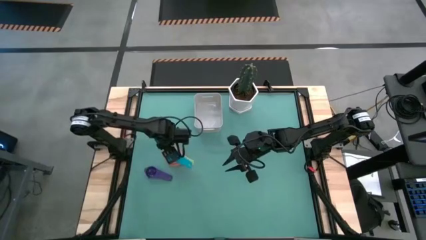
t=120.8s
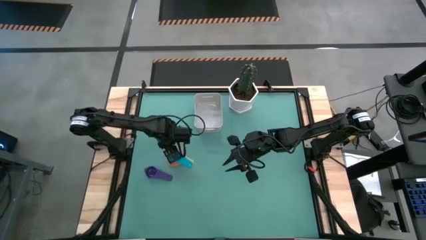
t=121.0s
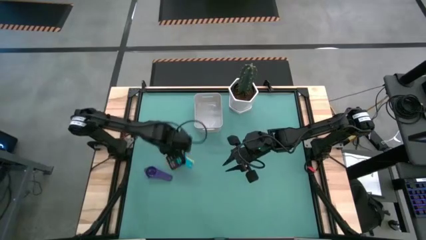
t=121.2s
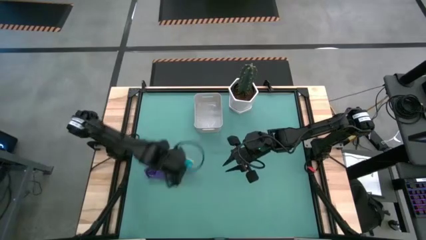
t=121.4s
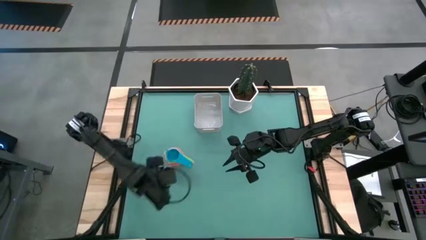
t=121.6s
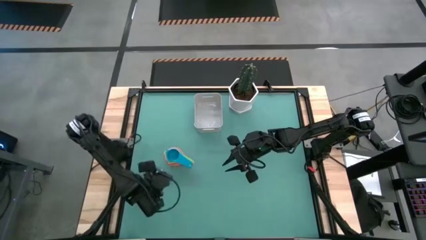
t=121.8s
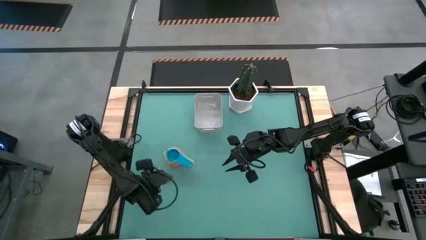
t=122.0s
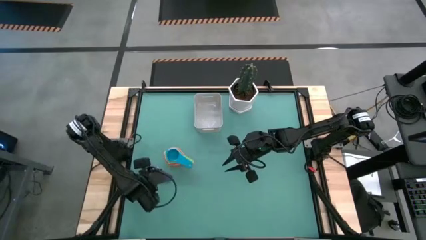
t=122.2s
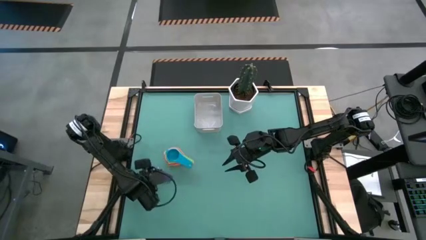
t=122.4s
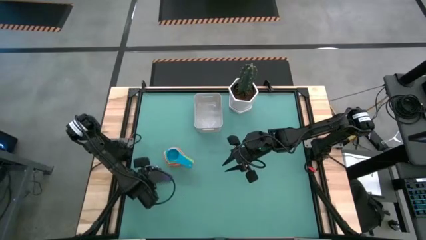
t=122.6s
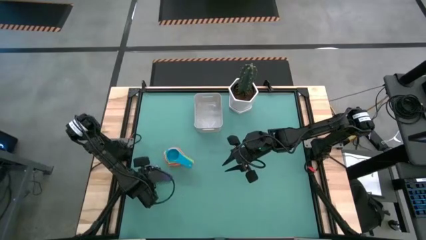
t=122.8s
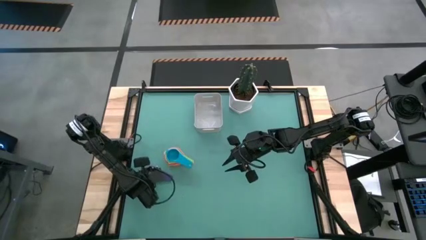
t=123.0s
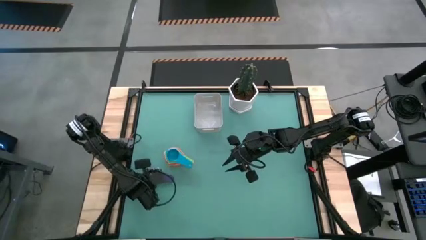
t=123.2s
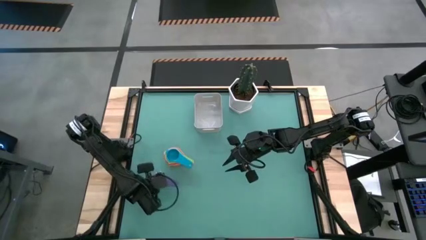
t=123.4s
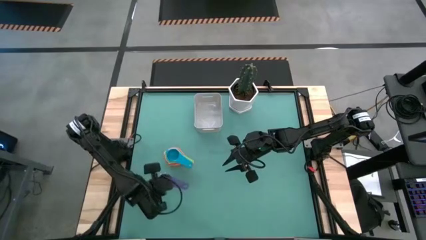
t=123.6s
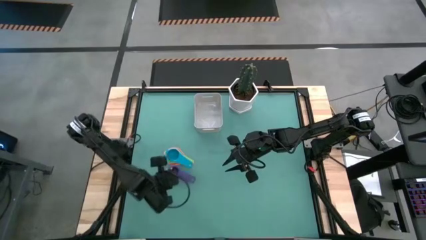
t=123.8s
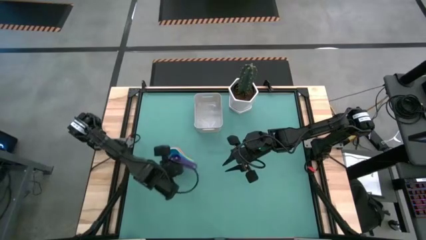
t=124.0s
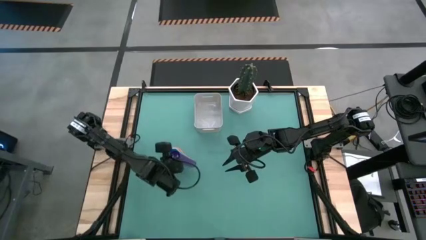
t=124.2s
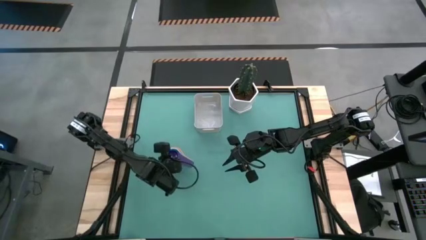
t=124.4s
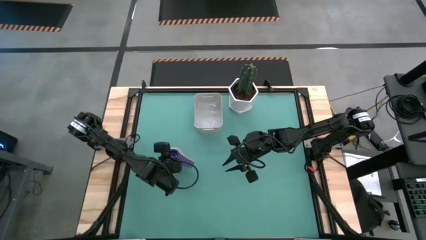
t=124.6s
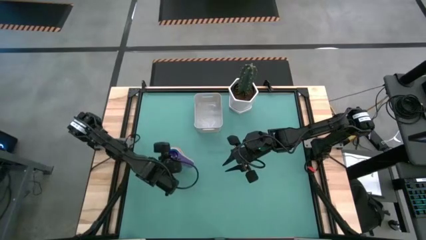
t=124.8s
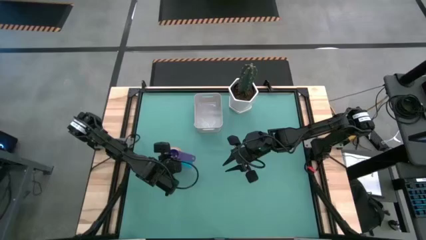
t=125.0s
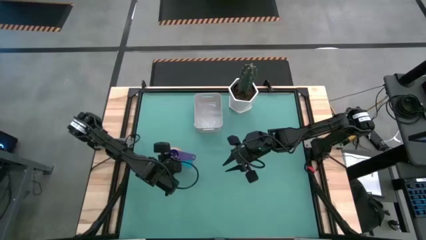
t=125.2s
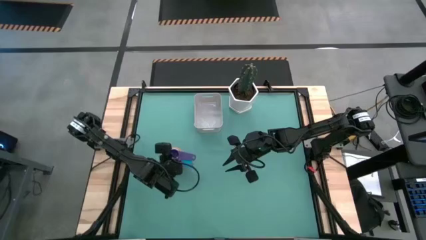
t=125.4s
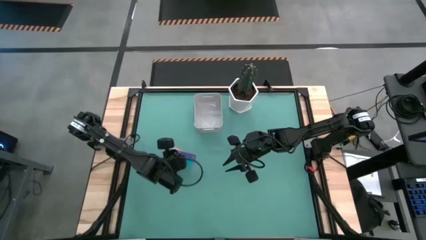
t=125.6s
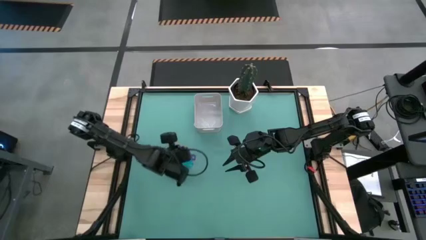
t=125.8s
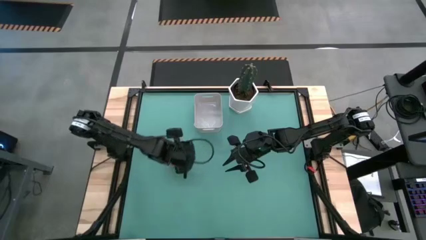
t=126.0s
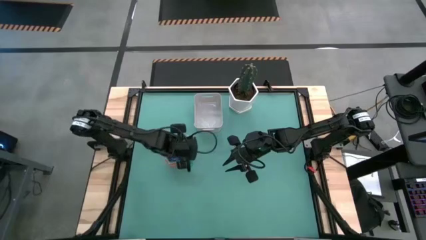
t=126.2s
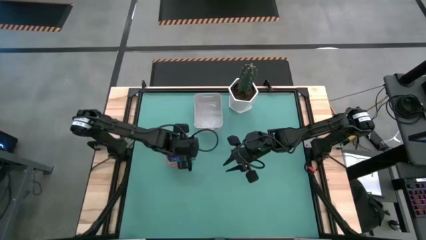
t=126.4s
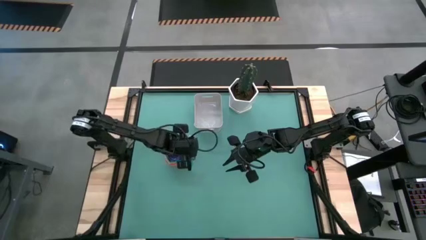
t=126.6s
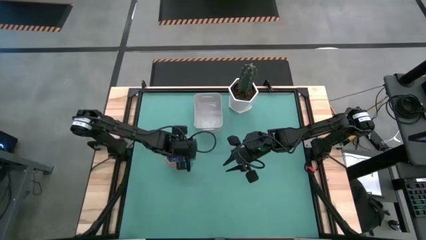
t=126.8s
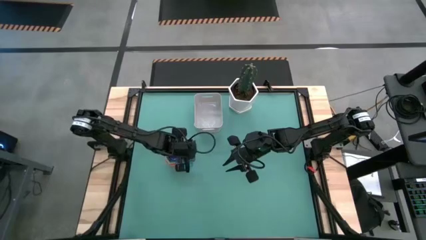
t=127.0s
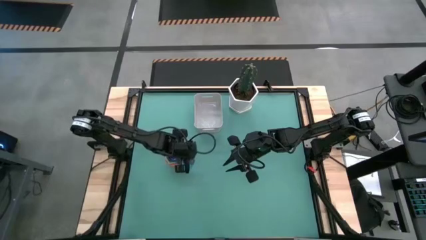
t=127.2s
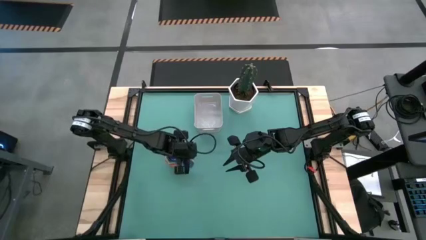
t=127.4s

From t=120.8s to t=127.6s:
Task: Nest measuring cups in basket
Stack the violet measuring cup on top of the blue measuring cup

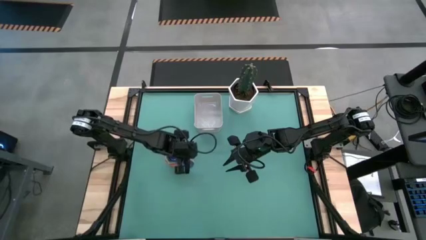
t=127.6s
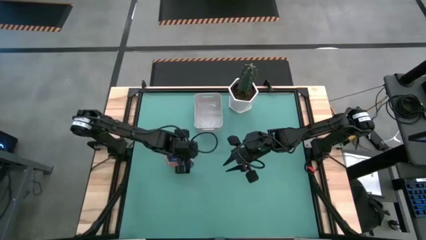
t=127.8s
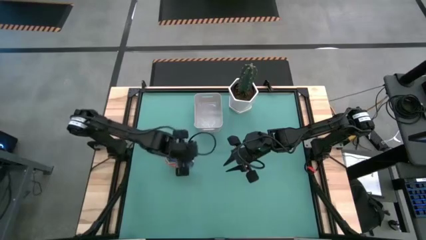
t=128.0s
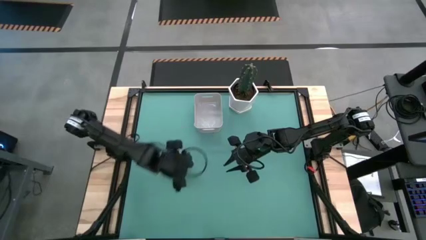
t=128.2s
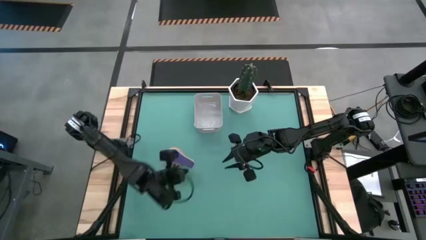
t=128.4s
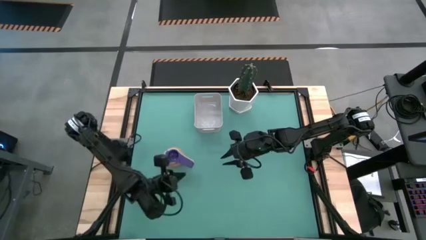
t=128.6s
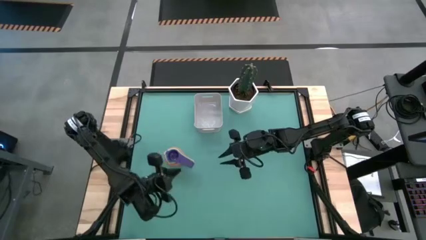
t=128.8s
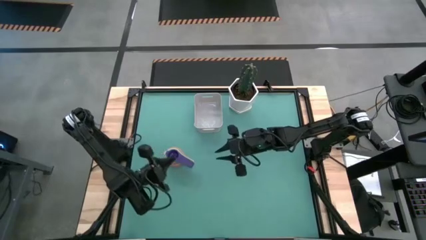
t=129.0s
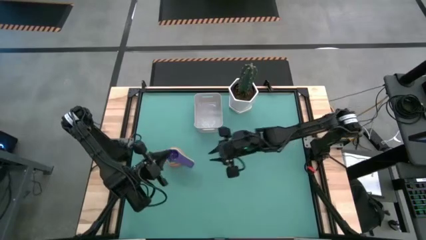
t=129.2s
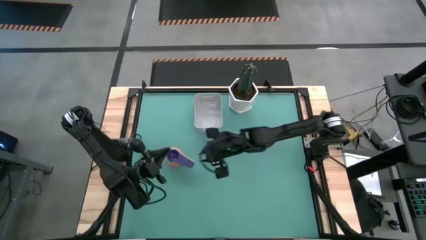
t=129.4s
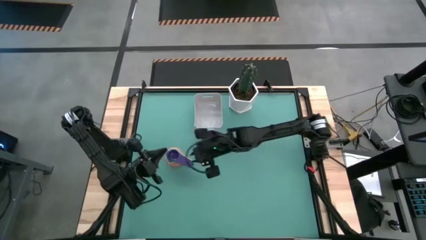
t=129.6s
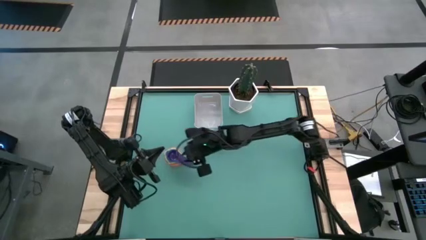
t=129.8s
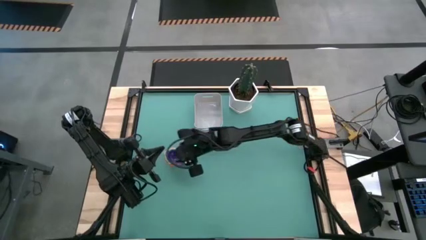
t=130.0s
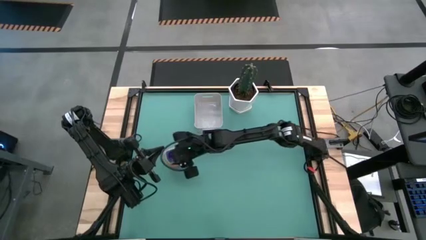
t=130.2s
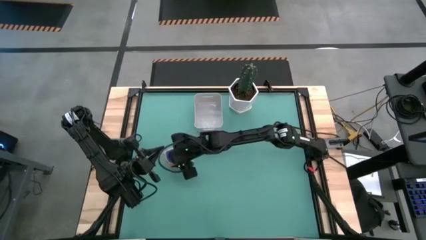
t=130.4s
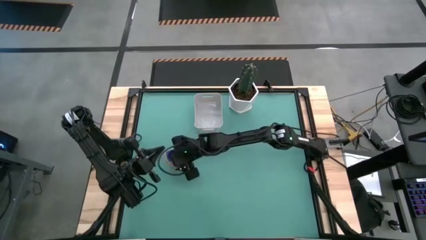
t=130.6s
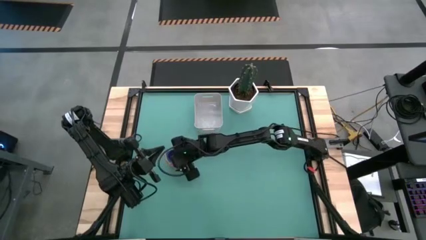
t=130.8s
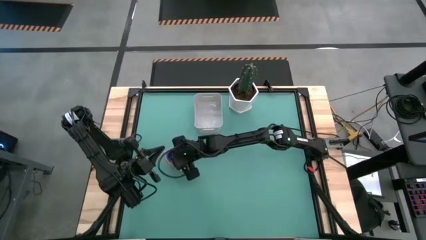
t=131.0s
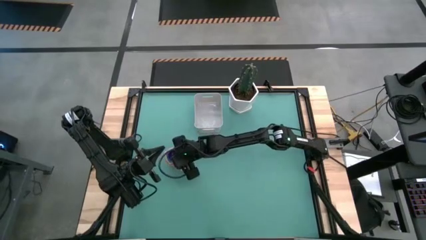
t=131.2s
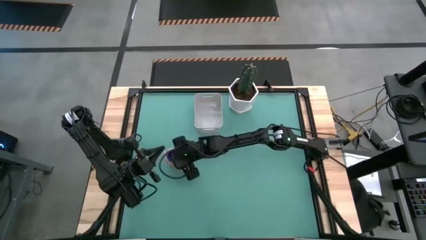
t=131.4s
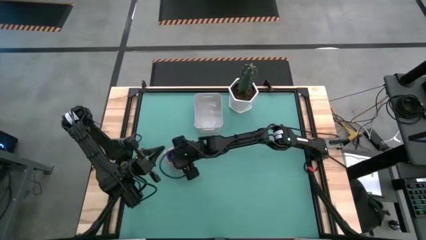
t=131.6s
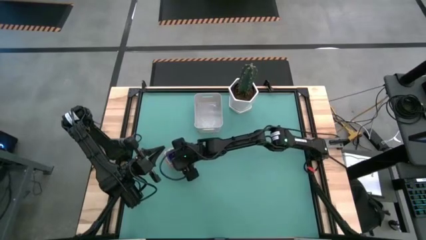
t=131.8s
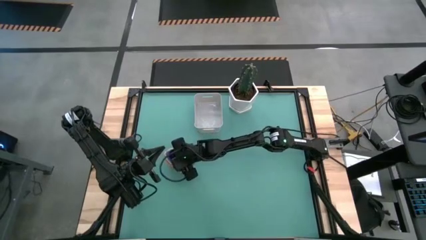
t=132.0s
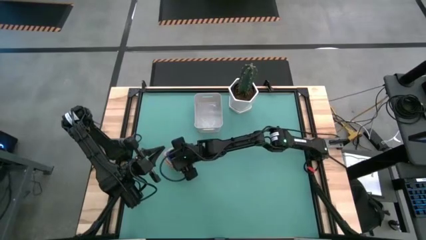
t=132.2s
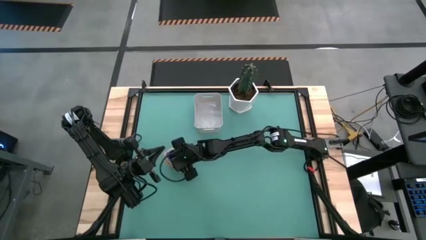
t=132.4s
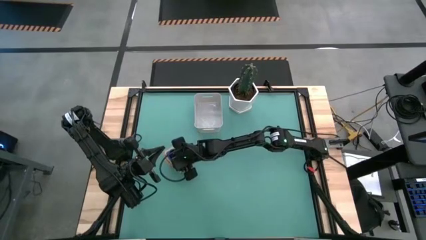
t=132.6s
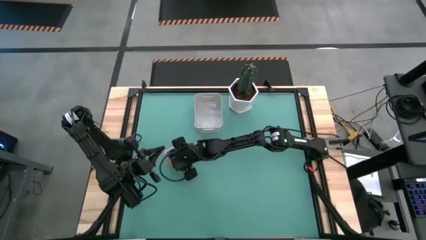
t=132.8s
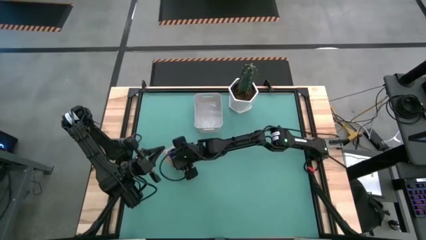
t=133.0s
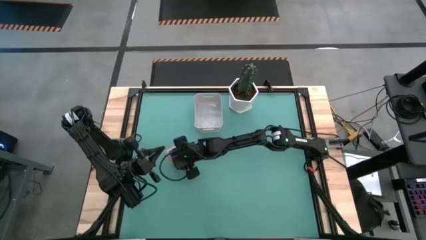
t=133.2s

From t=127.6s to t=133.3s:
Put the nested measuring cups into the gray bin

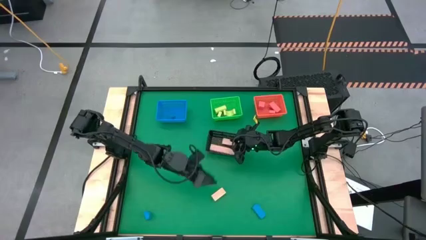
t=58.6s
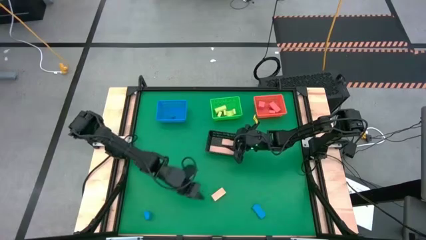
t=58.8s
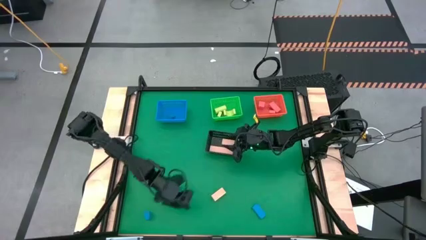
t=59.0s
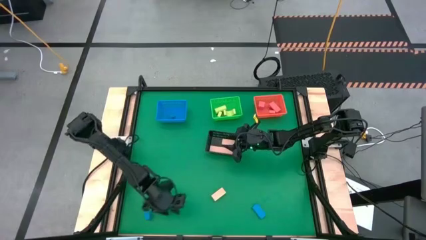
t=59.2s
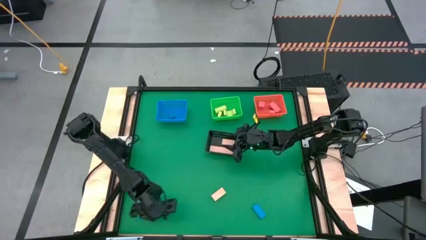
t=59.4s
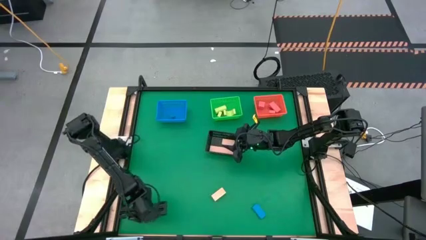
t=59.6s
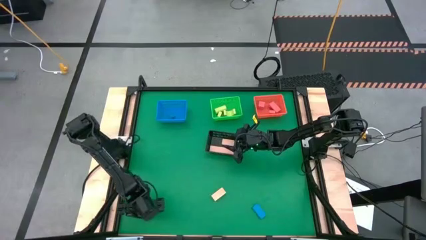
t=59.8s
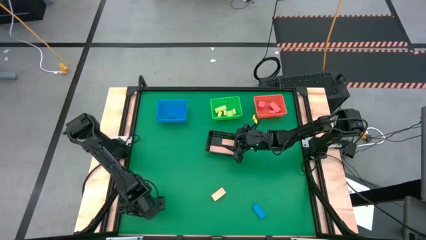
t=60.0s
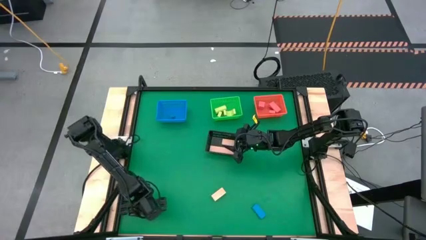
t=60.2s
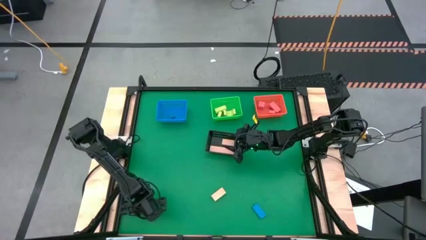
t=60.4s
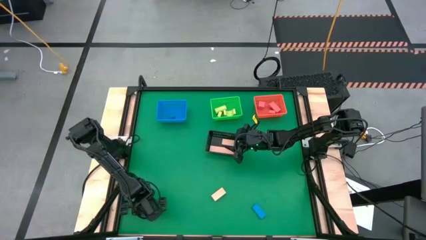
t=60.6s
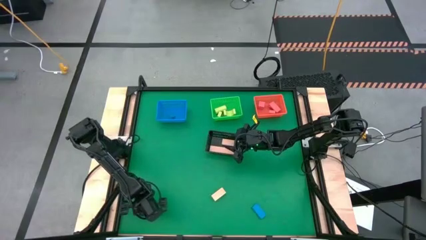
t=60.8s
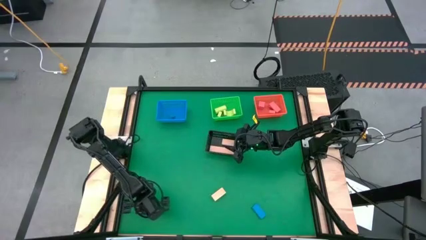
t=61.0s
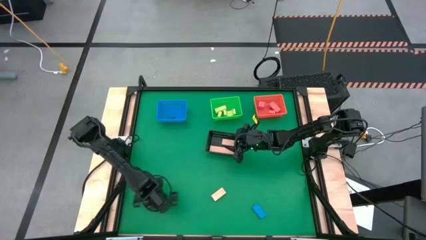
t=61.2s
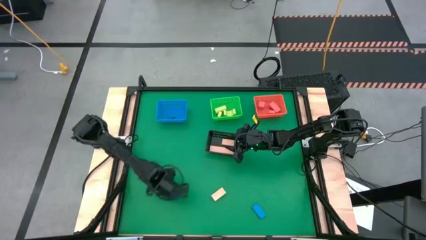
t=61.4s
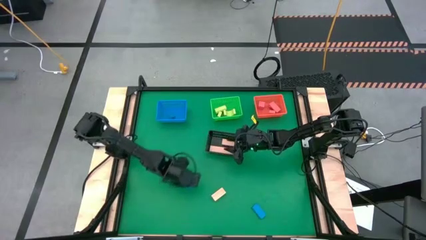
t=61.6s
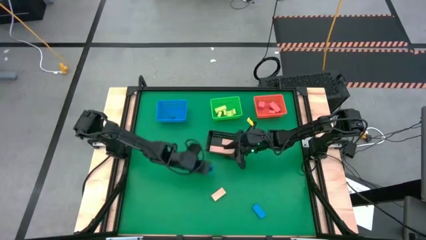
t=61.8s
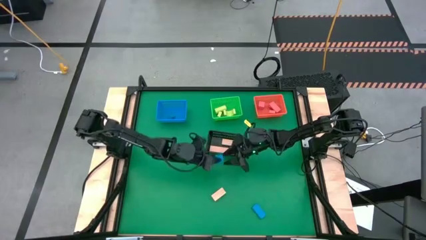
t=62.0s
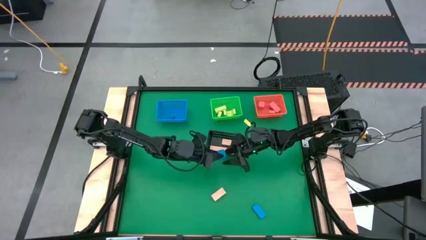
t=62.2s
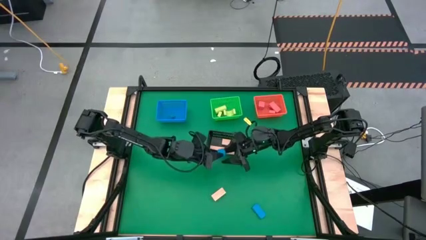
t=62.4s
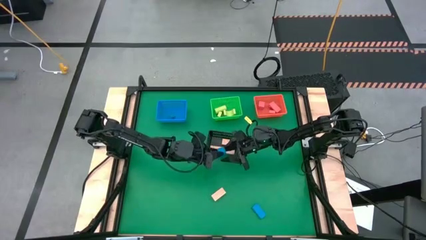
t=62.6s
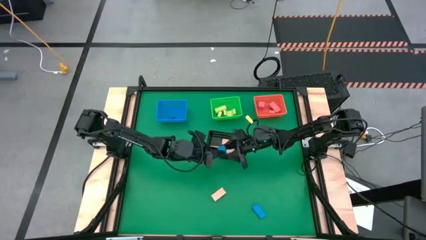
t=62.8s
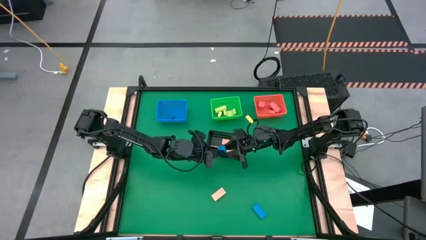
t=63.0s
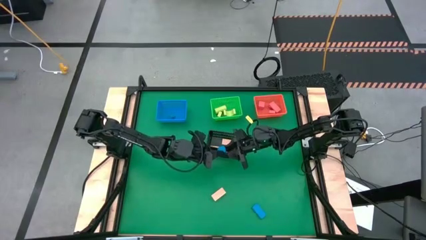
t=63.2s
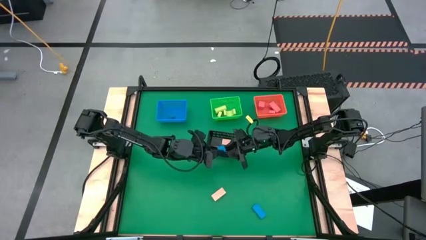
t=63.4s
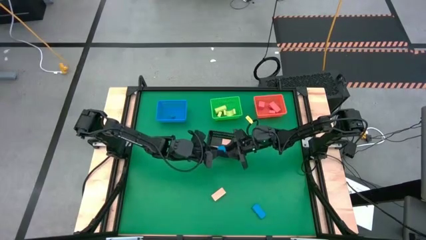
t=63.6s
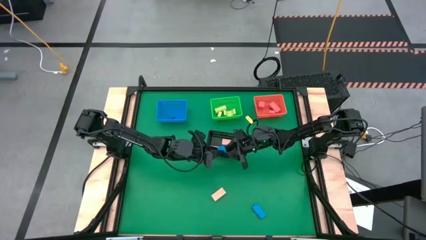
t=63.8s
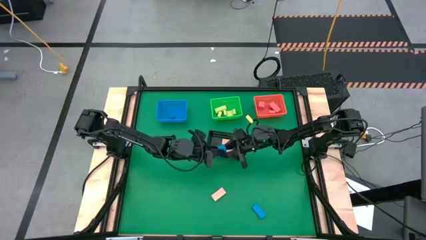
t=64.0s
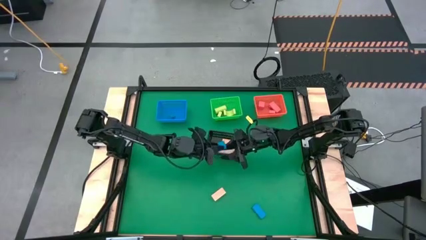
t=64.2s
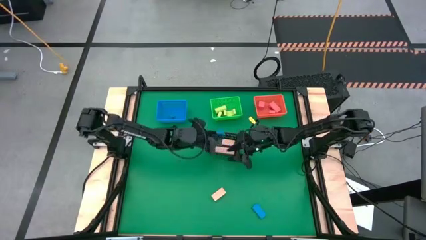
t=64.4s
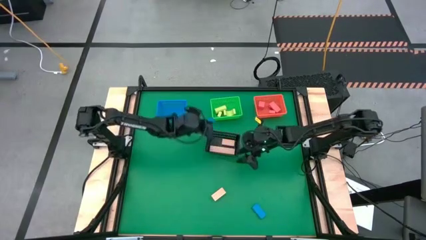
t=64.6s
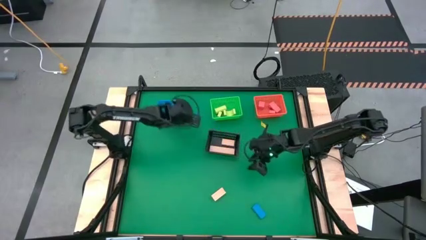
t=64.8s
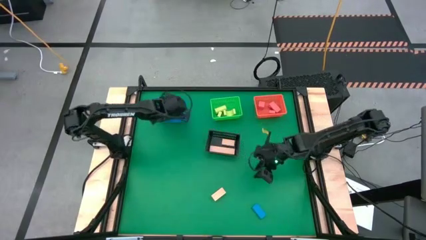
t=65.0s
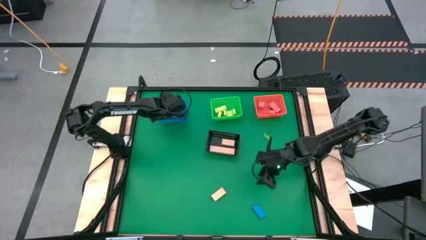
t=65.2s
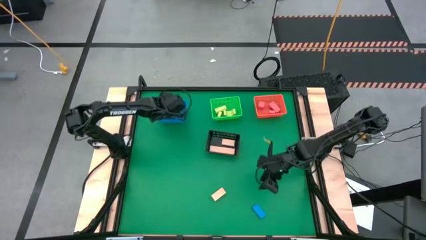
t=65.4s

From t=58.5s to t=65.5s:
Task: Sort & place blocks by color
Put the left blue block into the blue bin
